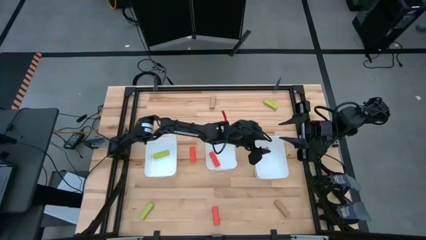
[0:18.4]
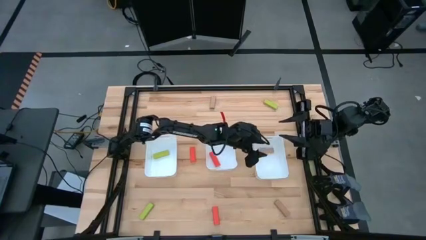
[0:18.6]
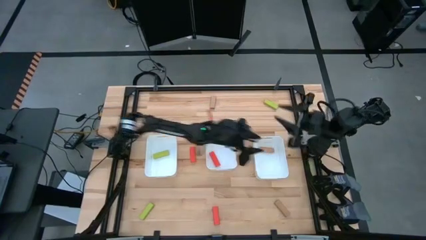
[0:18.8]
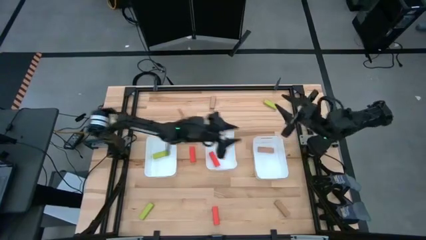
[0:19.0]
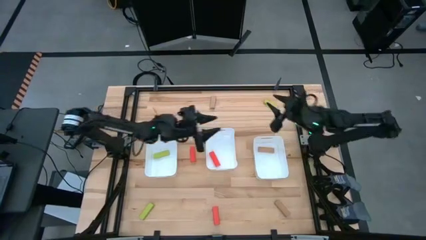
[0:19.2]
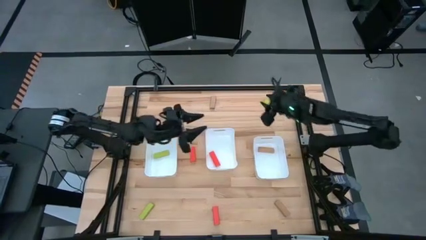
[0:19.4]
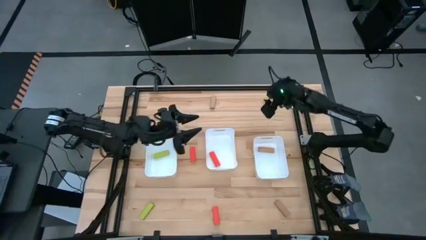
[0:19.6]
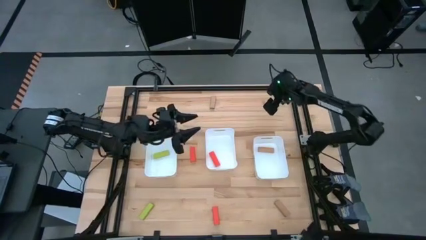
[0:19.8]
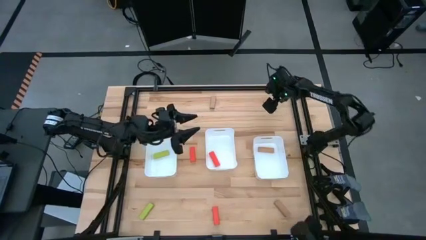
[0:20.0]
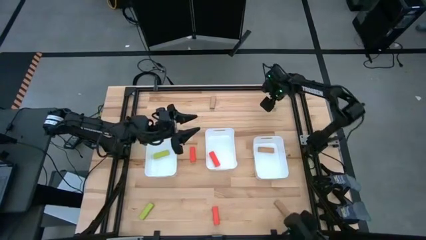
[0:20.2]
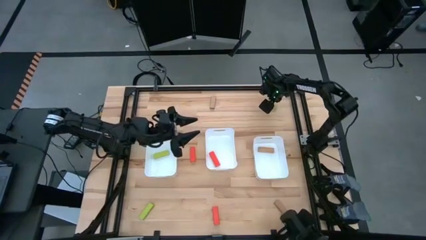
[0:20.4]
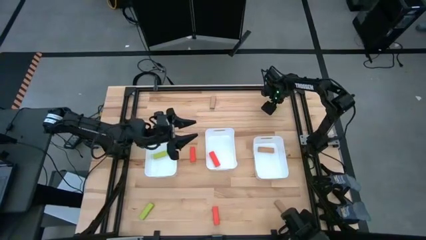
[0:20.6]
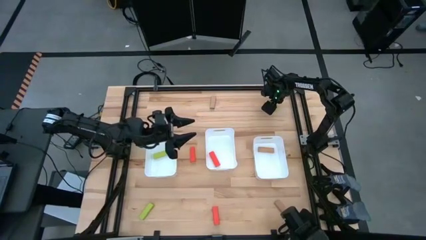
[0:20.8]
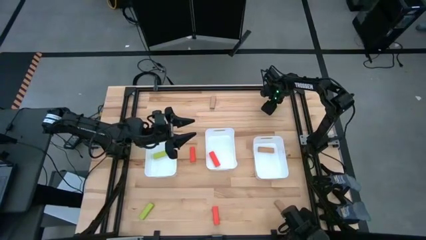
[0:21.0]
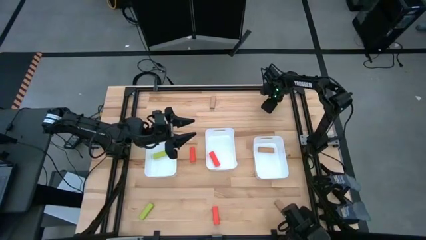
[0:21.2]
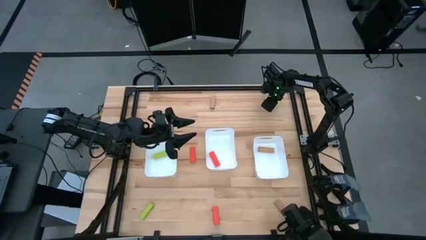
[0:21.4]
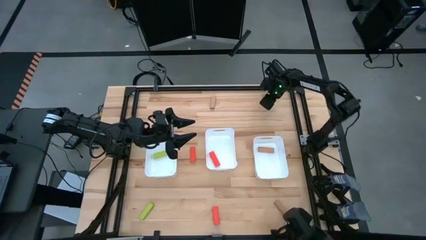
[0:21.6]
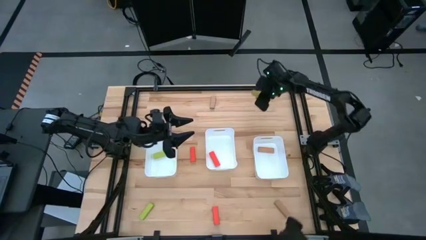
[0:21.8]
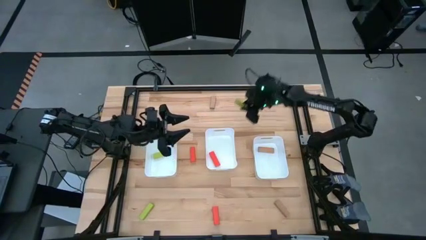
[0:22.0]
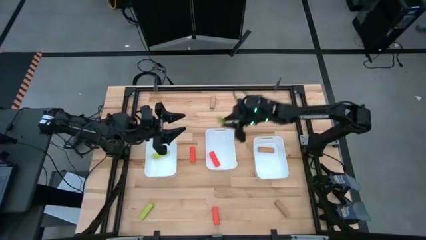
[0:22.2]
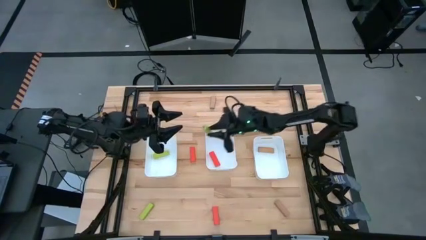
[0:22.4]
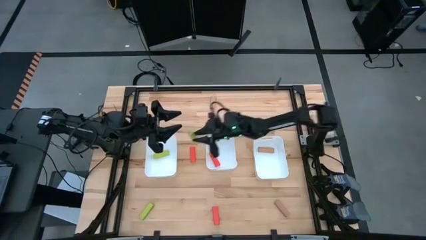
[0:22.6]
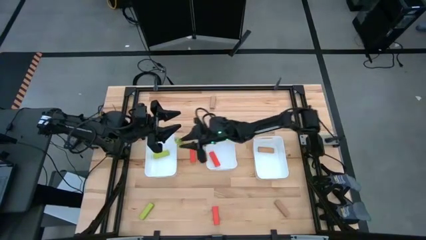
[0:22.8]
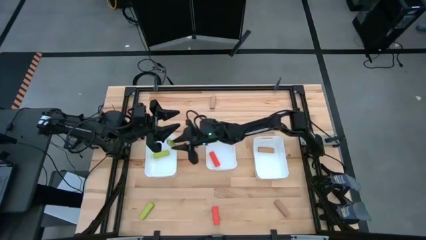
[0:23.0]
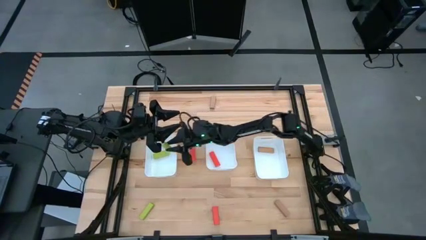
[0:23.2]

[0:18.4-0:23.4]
Task: Sort blocks
Put the top green block into the left white bin

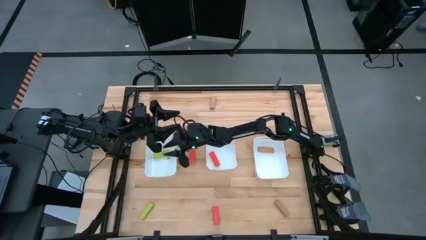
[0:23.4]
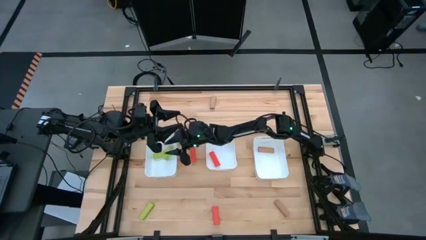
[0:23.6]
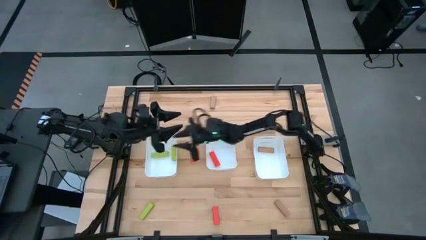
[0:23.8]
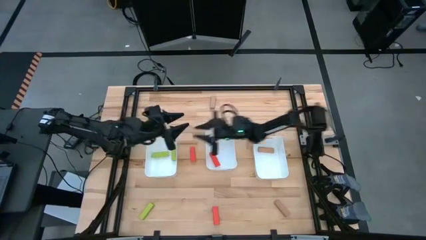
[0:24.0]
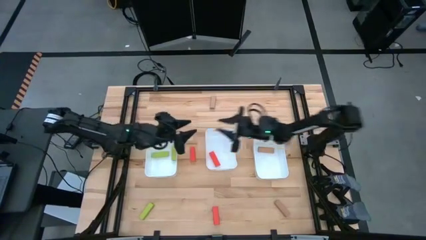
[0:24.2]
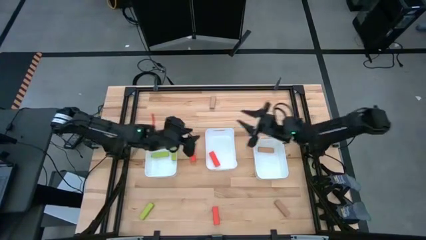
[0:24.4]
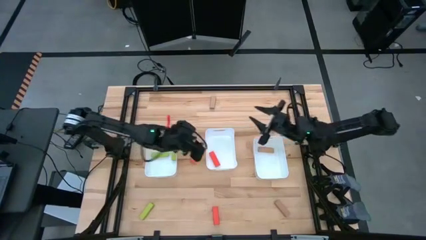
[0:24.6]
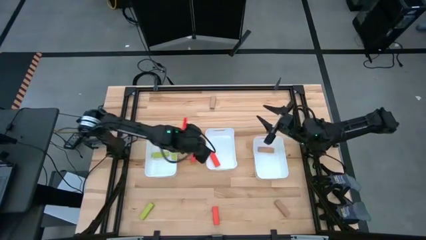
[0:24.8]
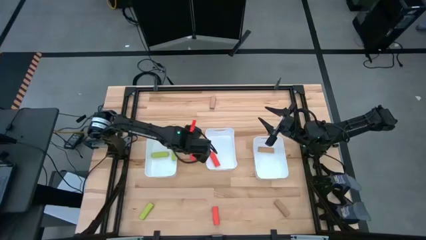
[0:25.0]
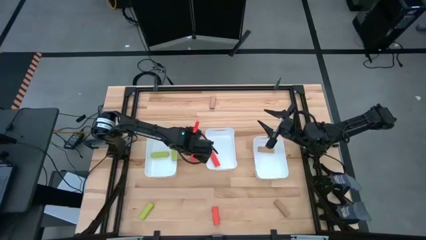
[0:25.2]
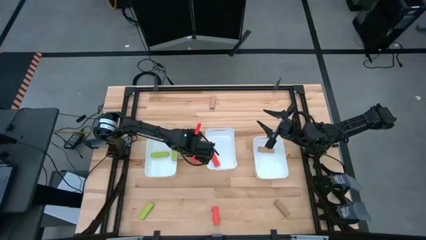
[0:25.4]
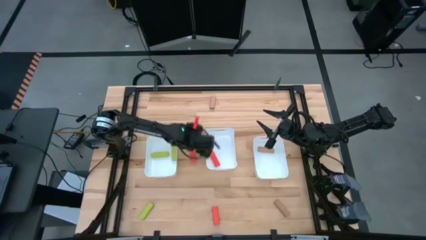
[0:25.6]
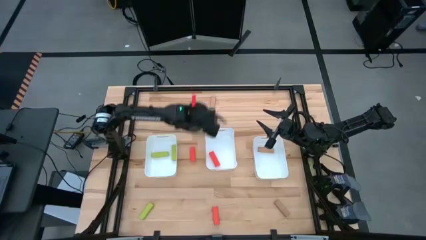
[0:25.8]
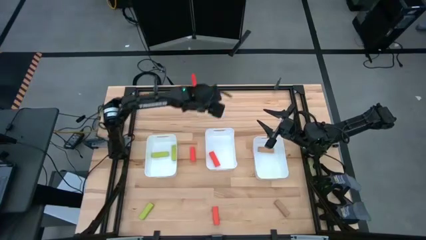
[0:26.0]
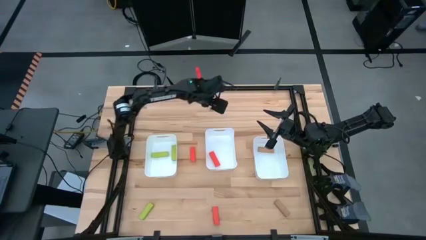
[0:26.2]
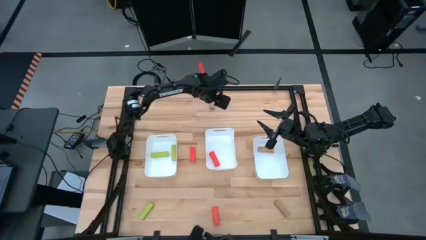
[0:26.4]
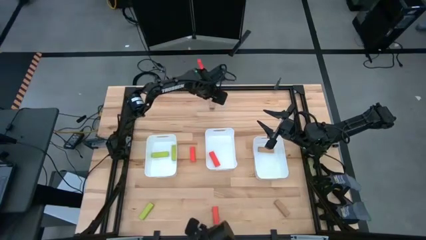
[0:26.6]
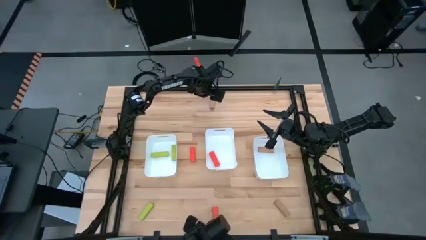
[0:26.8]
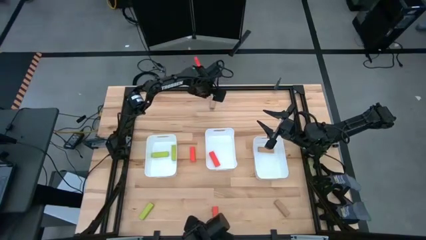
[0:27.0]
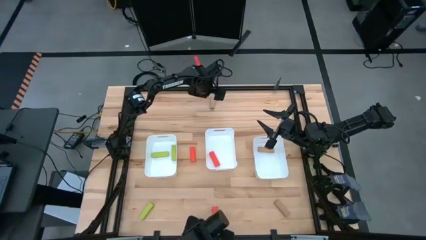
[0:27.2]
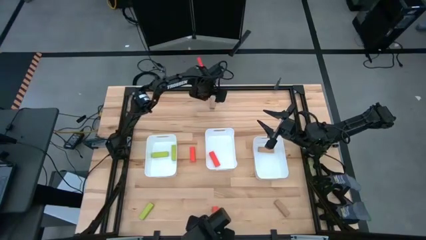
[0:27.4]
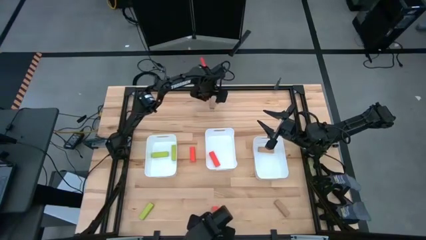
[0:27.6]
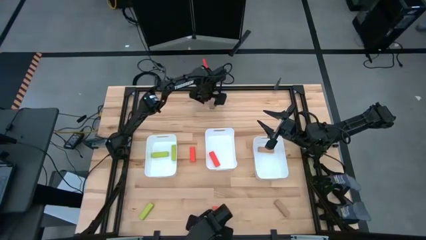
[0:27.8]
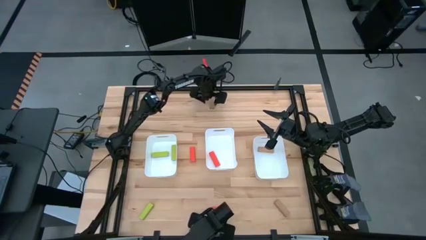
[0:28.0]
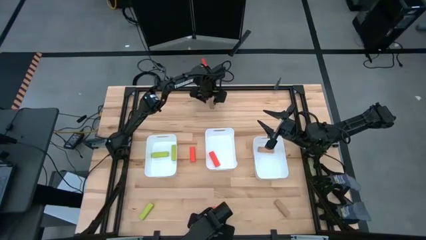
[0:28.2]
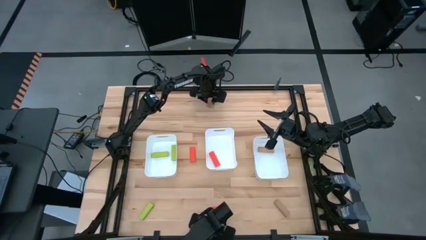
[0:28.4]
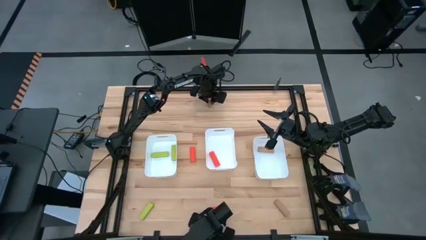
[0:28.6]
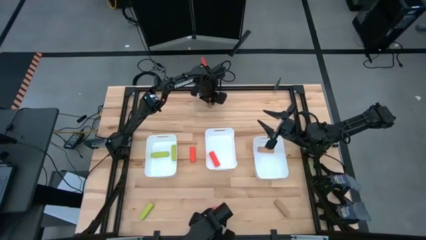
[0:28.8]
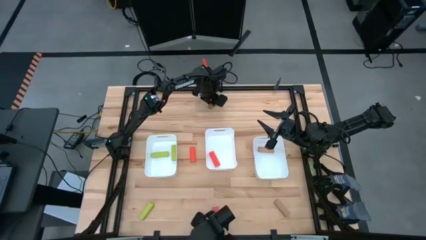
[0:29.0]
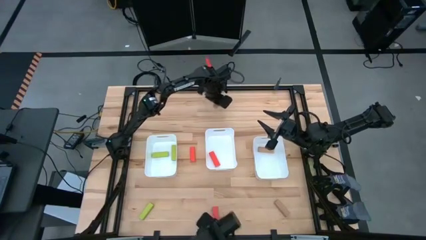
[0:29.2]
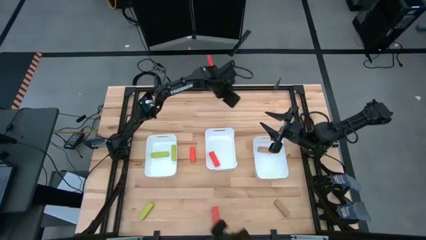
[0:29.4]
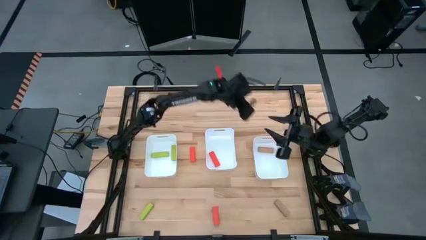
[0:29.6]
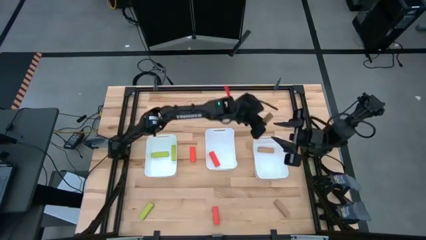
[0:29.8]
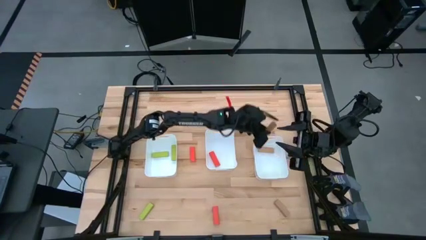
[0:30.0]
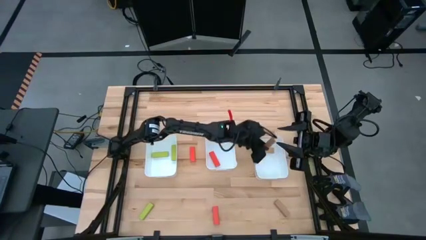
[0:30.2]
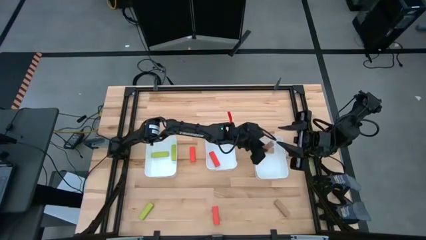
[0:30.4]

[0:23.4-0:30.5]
Put the top brown block into the right white bin

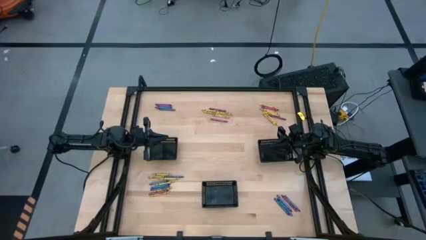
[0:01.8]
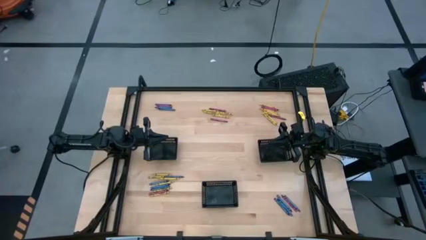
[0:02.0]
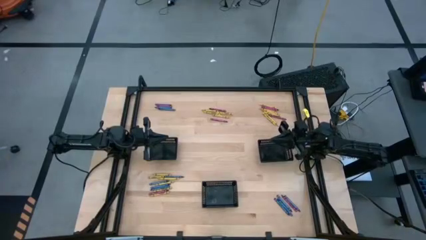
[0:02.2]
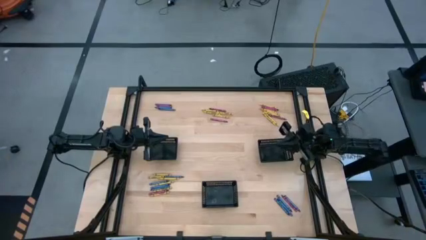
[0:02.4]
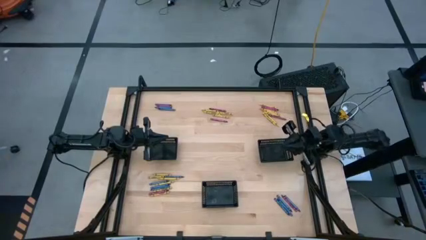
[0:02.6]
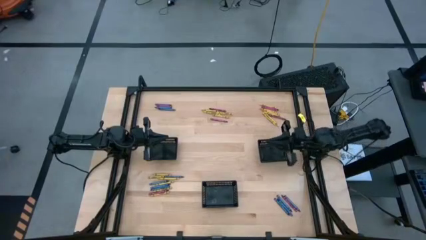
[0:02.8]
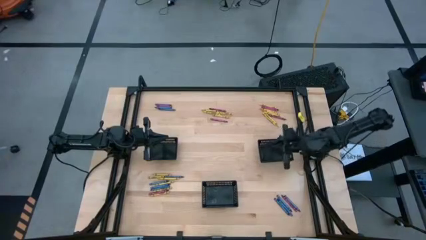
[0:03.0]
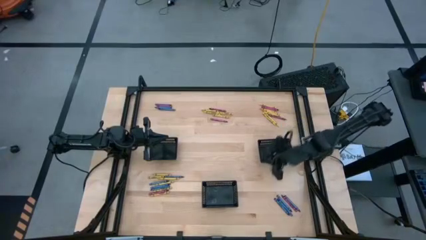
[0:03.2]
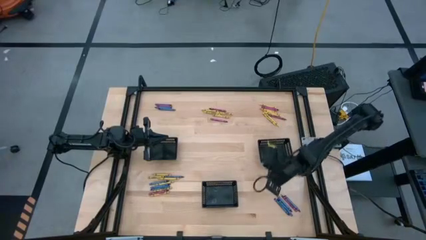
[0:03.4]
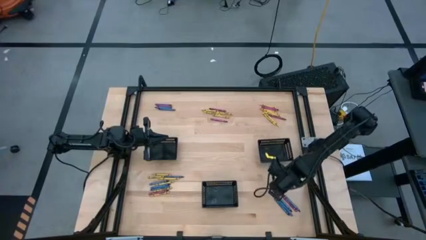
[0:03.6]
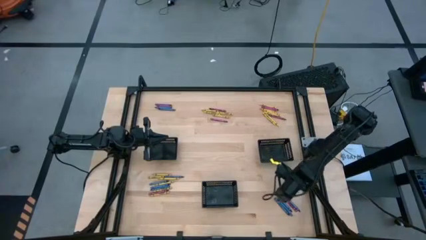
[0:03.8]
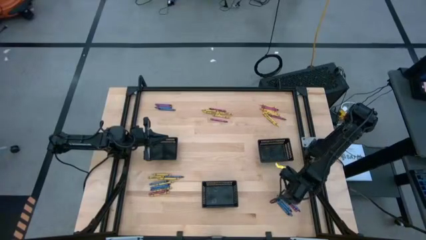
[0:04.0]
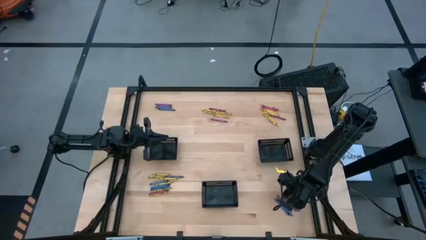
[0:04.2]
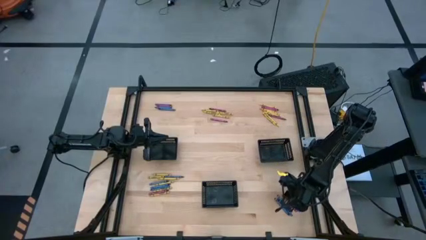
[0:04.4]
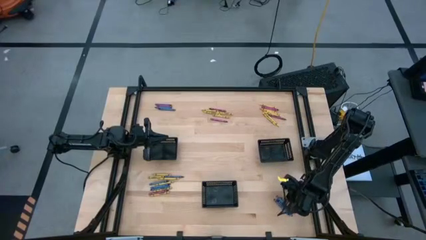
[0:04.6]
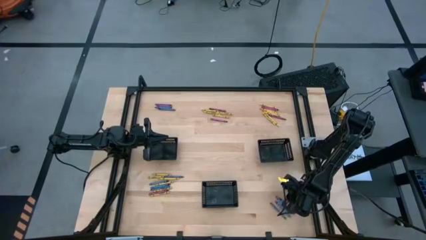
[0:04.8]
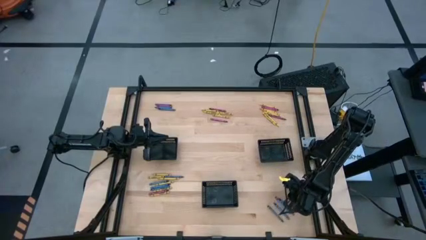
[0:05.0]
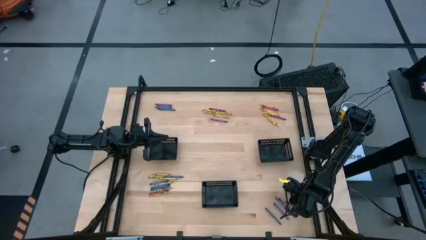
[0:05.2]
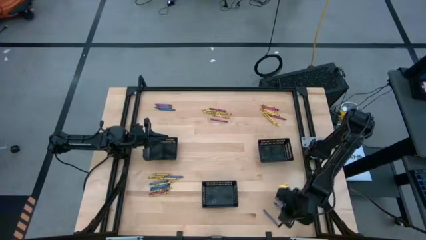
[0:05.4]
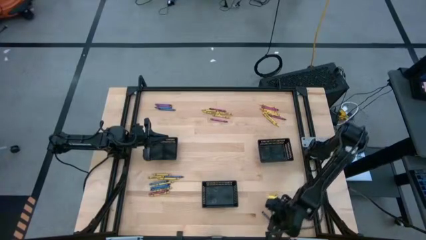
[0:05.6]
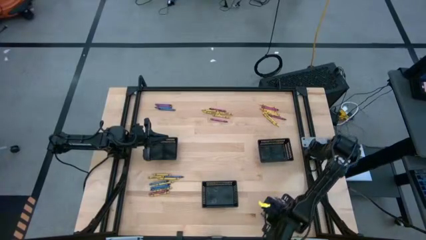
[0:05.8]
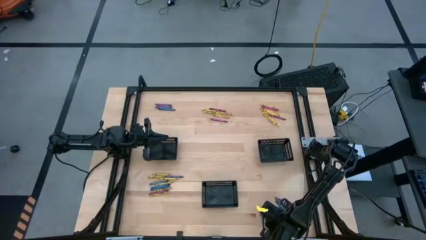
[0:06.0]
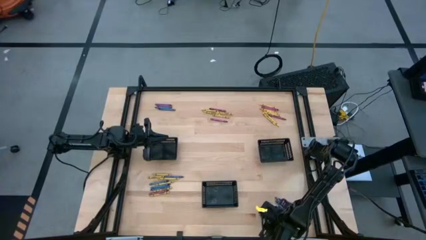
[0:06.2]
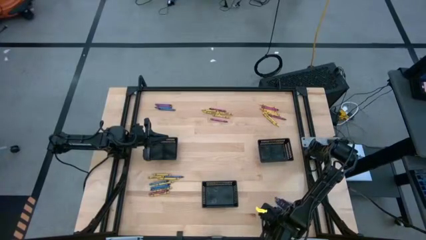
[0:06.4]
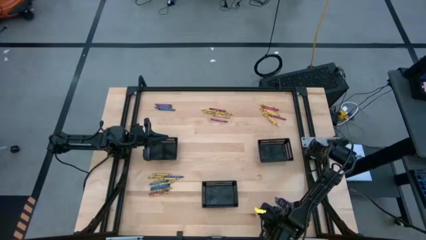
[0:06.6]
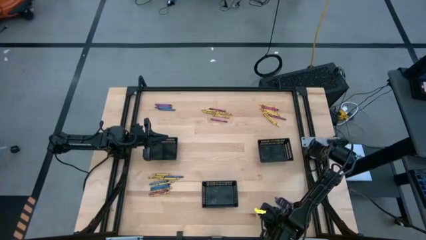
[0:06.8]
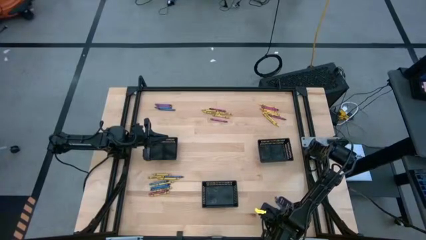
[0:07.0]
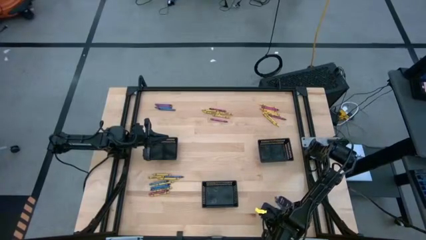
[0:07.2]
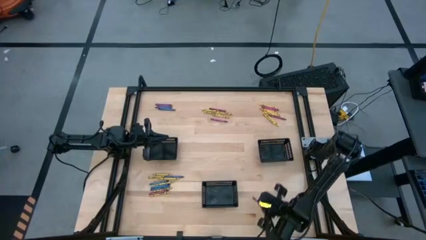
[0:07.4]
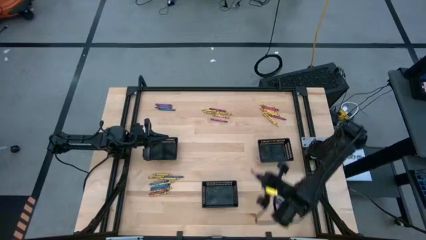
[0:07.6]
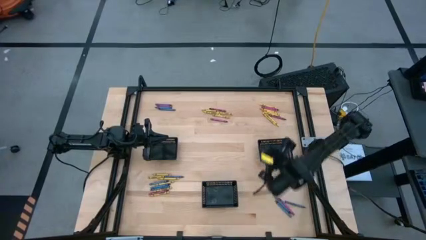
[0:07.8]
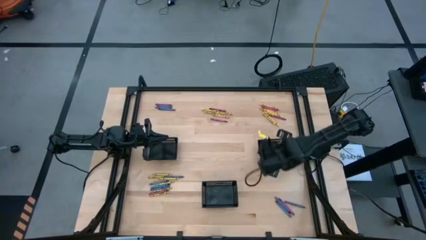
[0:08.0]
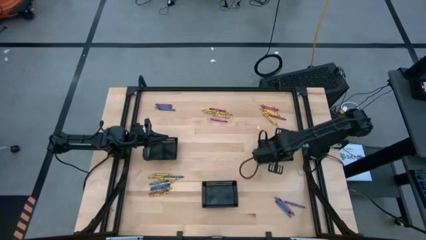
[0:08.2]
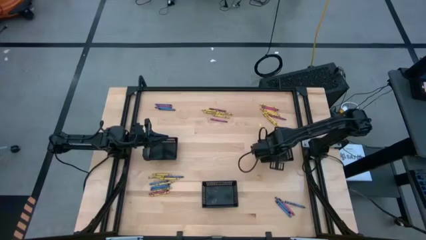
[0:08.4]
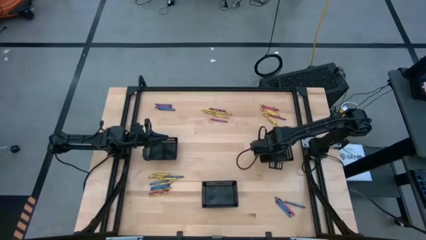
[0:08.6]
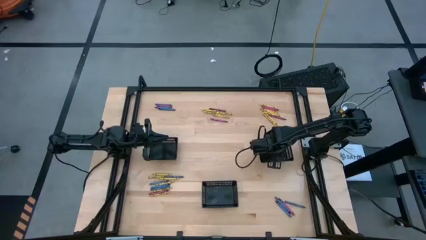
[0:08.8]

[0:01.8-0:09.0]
Task: Sort crayons
Put the blue crayon into the right black bin
